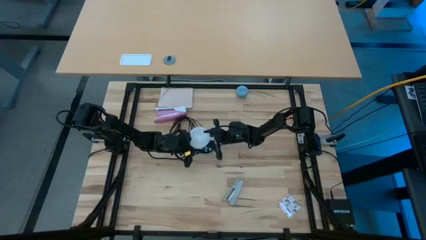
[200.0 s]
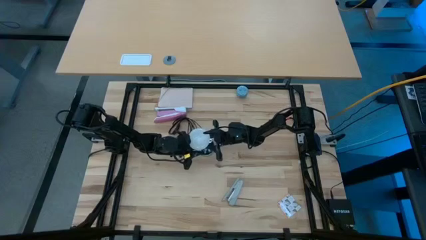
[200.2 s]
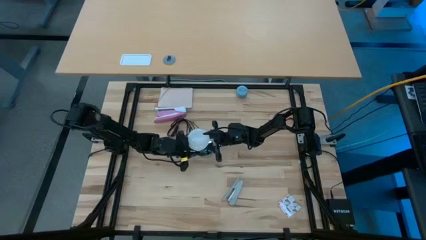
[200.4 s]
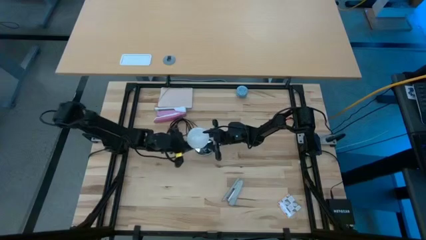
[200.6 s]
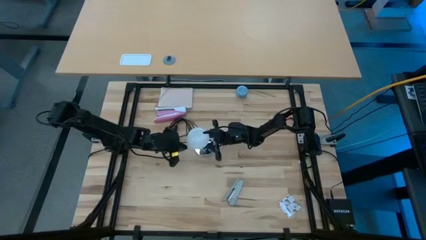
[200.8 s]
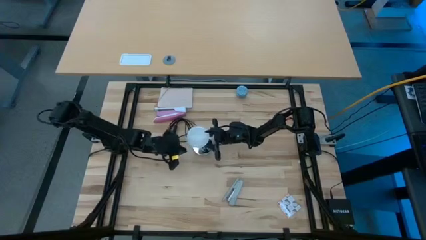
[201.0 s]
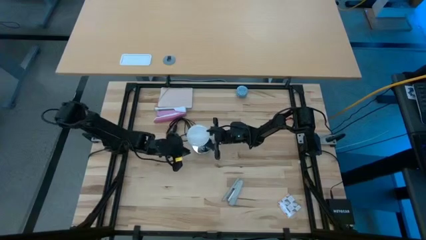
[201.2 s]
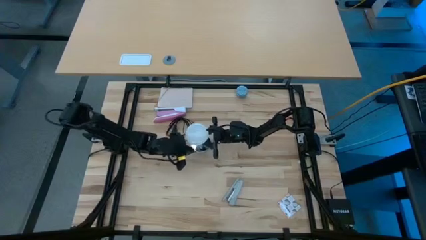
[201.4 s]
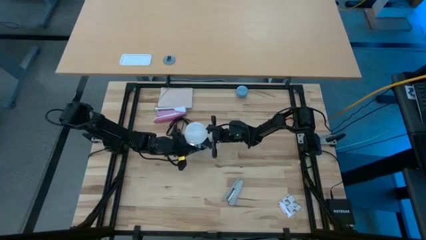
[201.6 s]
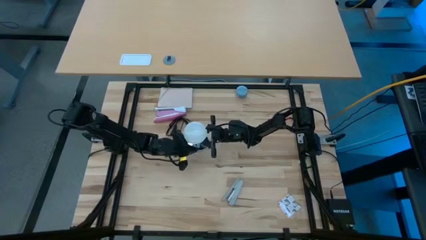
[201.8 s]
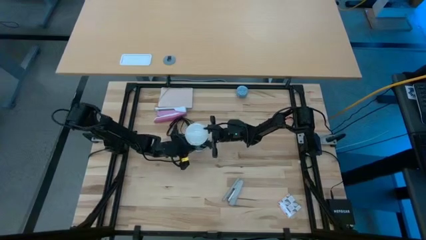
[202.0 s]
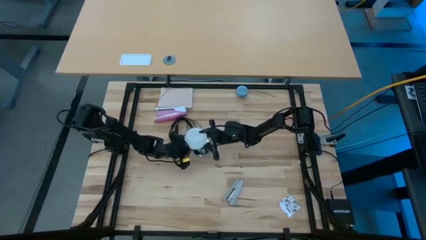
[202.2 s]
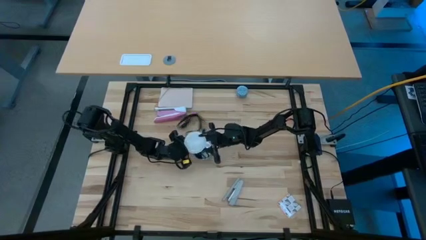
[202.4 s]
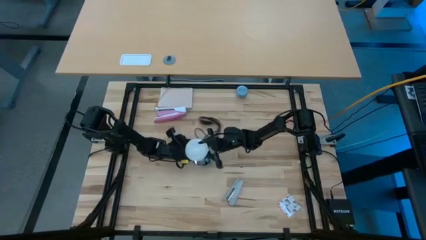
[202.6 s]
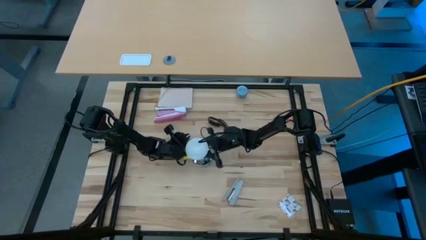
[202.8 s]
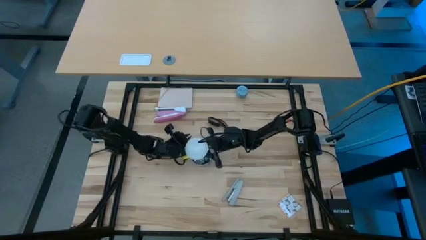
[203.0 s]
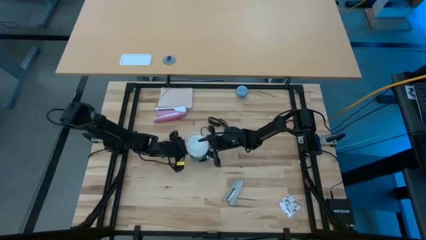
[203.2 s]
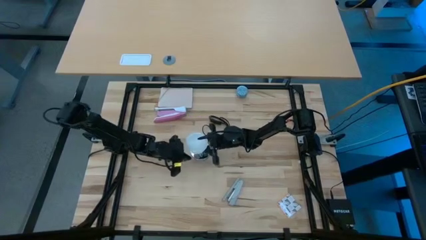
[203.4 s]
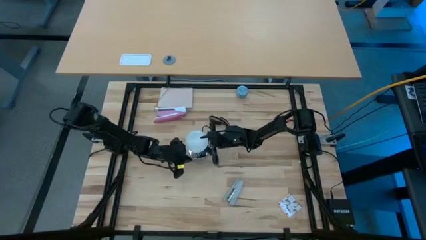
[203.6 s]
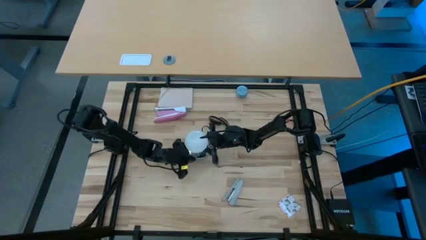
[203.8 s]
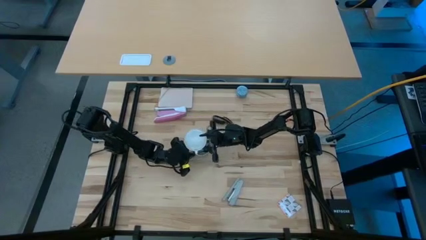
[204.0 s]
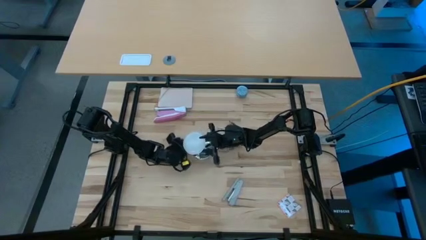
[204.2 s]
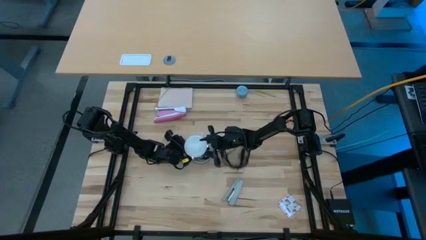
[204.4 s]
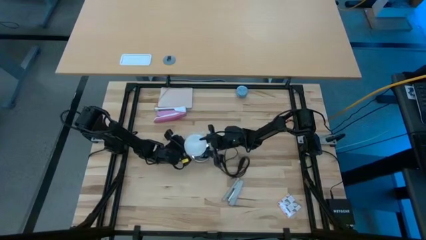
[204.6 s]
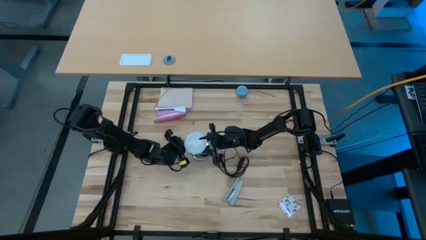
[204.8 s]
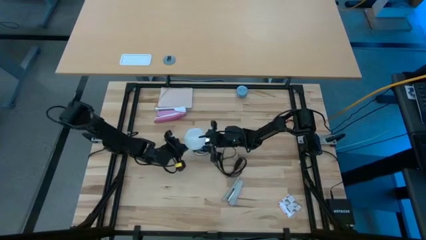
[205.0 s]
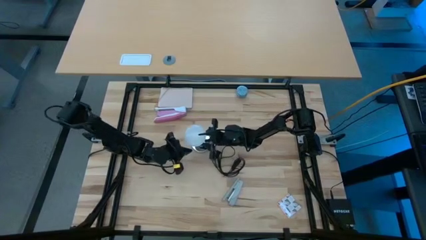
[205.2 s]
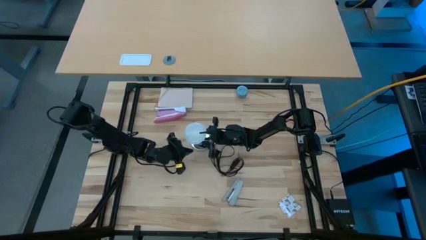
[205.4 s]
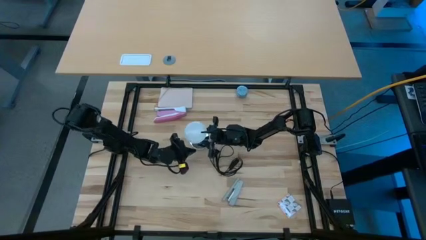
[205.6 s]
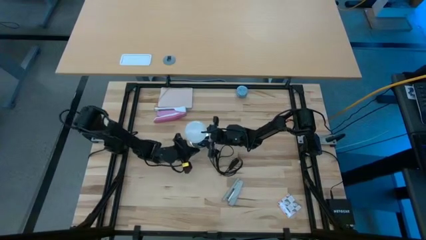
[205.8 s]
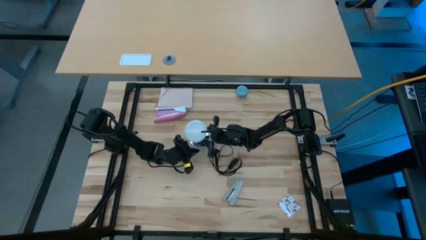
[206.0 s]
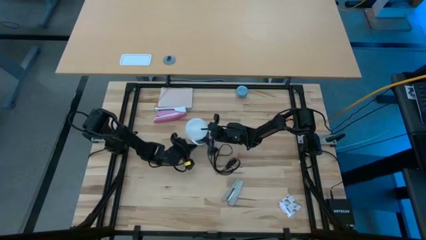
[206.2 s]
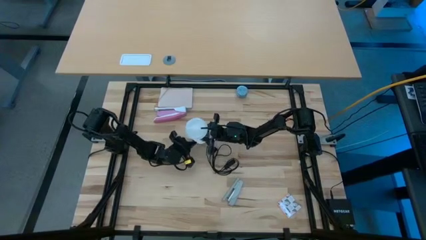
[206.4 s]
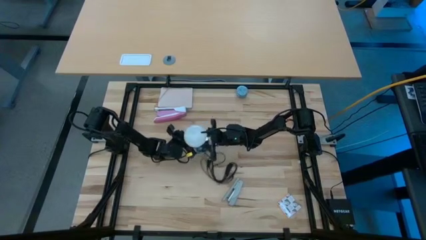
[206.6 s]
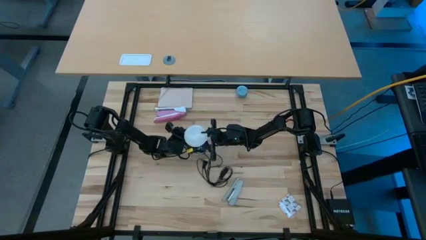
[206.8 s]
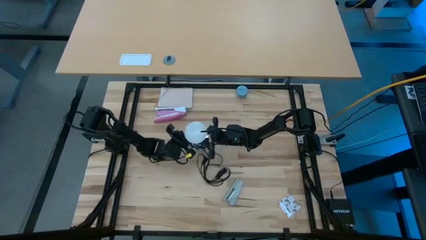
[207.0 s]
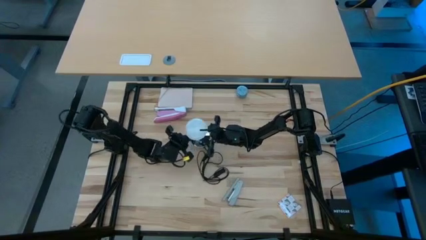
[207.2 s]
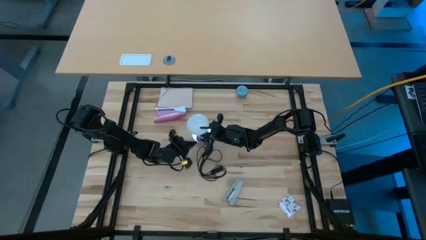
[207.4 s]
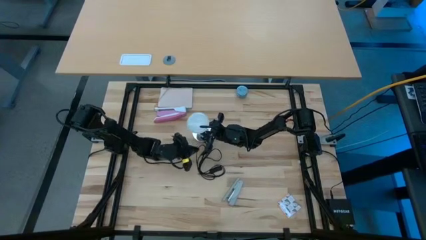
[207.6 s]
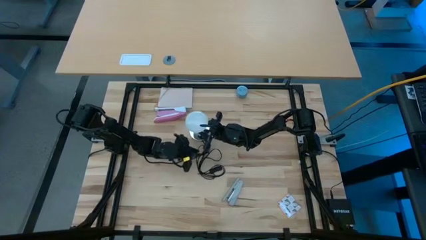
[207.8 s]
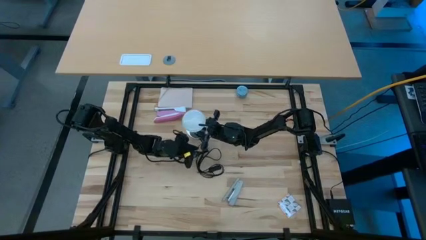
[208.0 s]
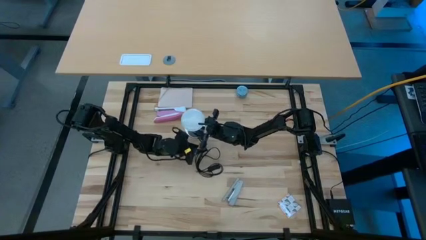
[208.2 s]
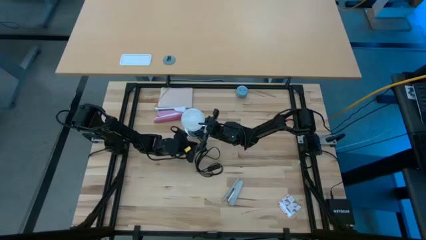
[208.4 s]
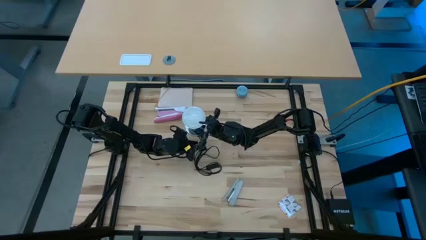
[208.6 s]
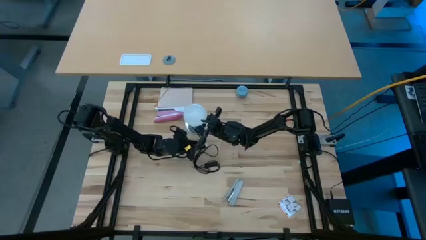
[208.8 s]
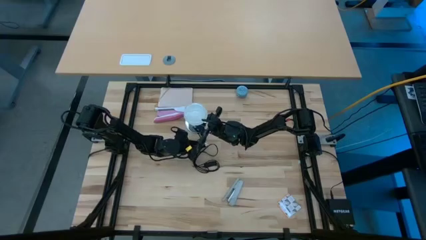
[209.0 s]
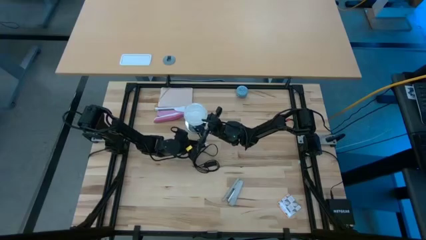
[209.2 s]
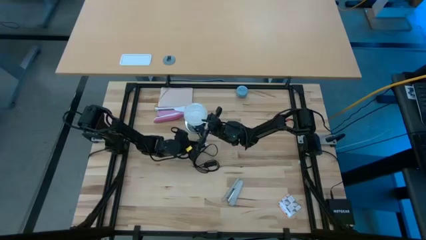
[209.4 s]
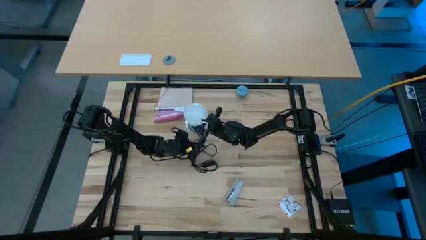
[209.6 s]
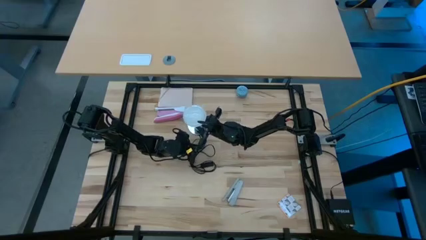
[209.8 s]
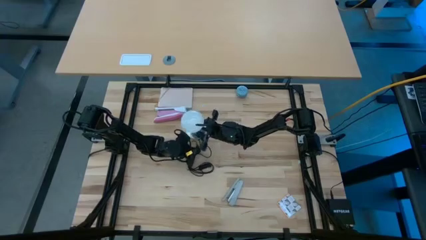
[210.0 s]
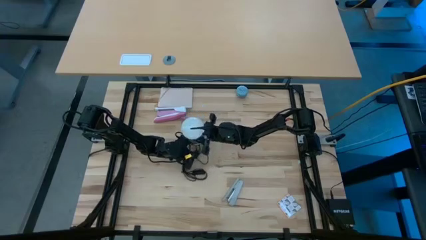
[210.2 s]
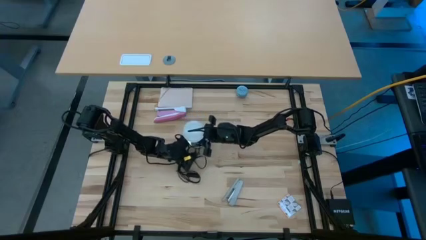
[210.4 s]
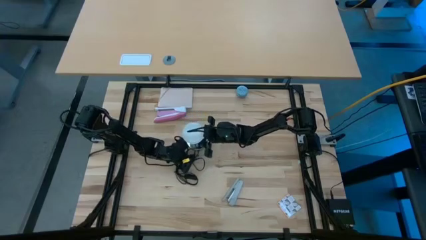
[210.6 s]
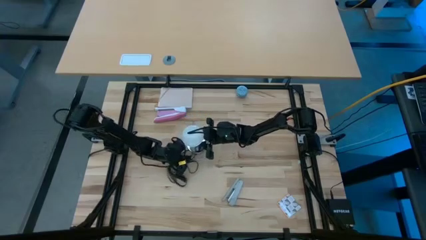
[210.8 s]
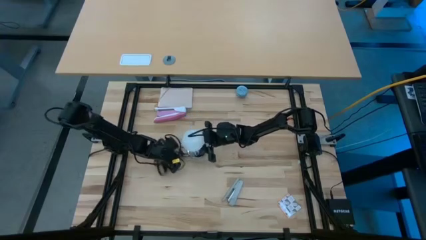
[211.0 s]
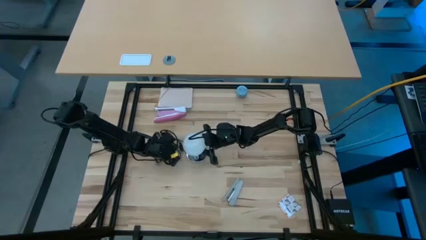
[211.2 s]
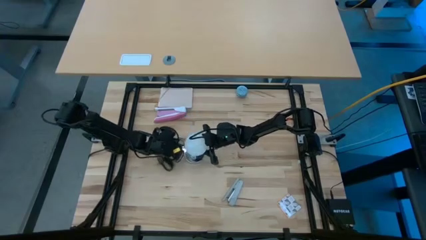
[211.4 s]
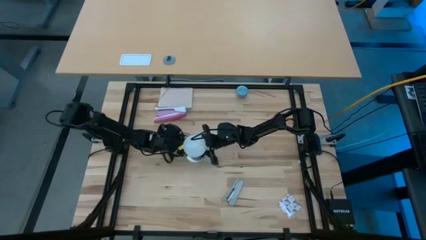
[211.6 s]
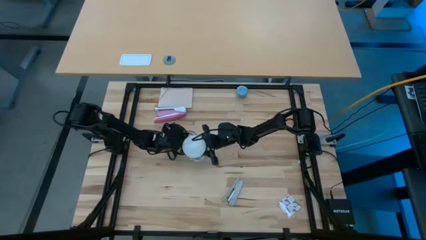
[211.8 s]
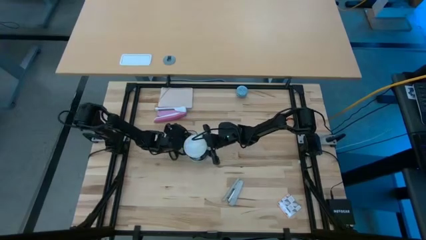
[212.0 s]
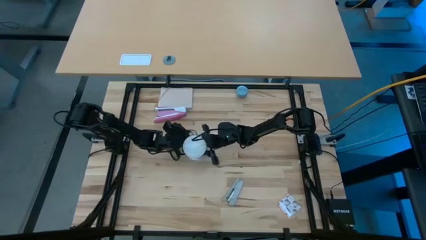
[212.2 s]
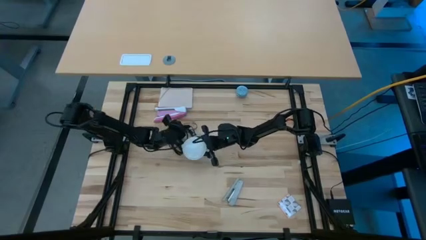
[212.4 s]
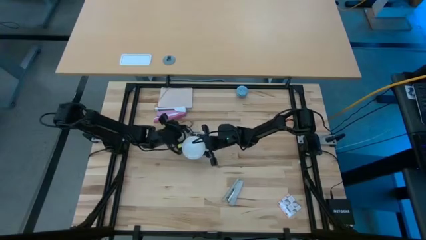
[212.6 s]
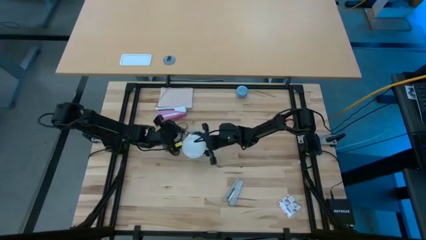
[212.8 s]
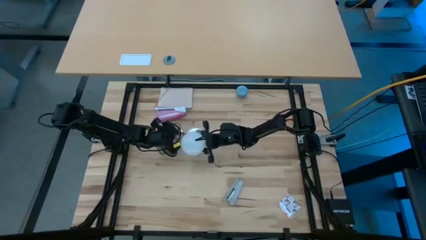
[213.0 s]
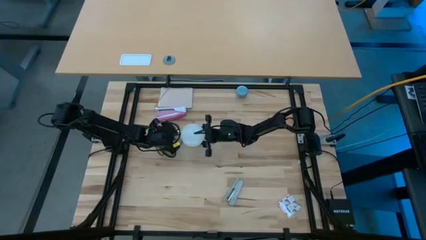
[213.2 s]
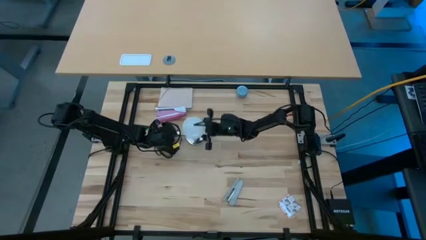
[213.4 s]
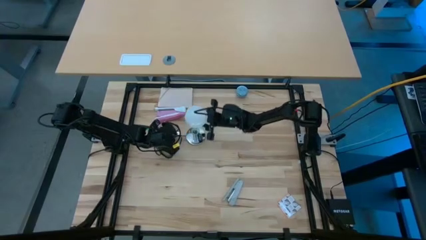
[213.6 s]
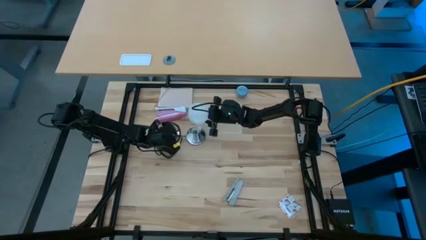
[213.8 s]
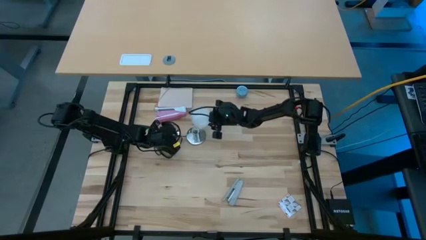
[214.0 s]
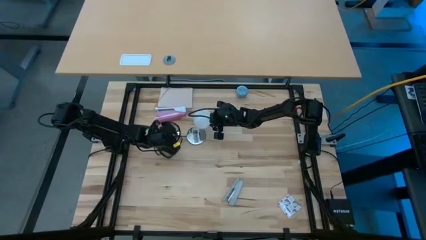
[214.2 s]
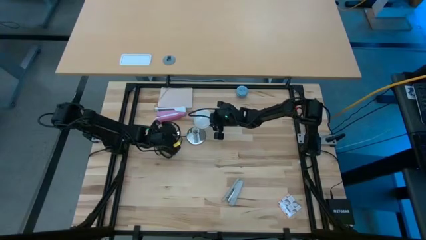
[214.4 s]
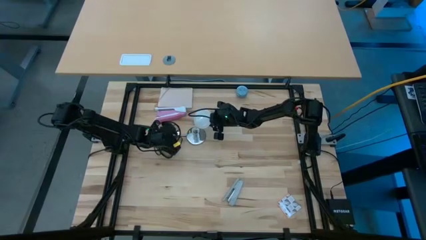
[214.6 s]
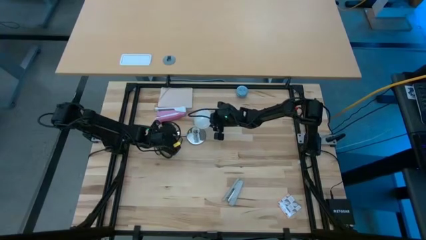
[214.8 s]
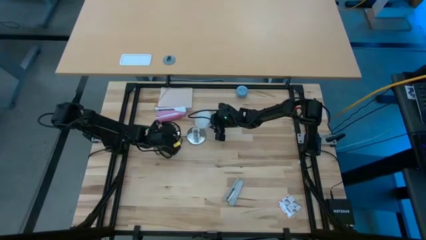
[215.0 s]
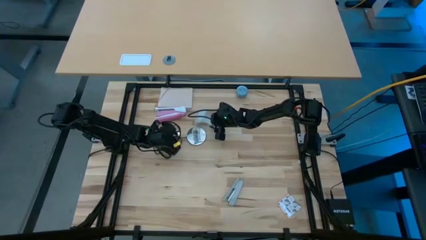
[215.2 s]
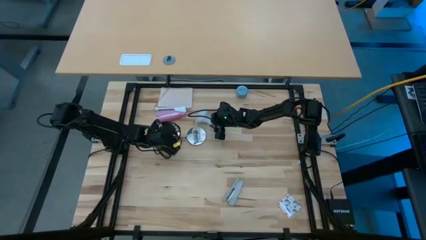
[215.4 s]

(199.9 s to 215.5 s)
Task: Screw lightbulb
Remove the lightbulb from the lamp
